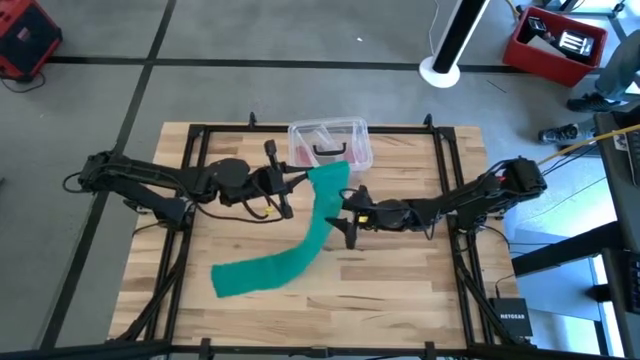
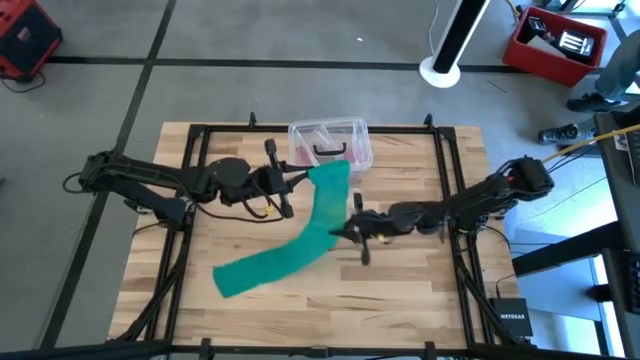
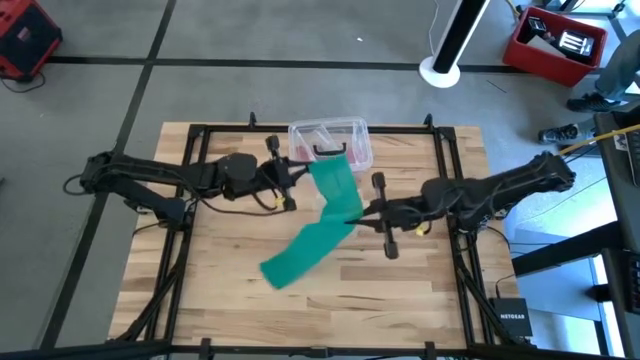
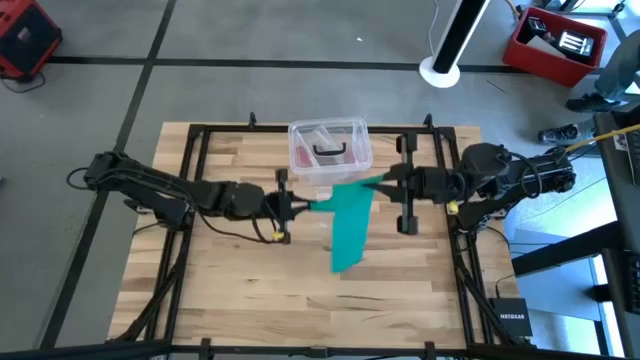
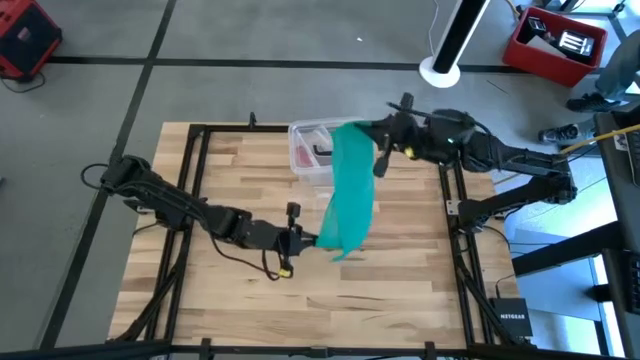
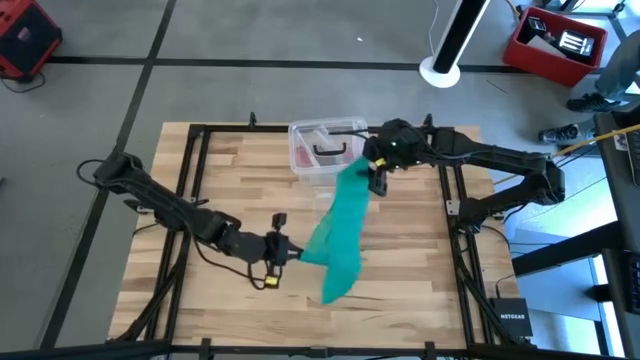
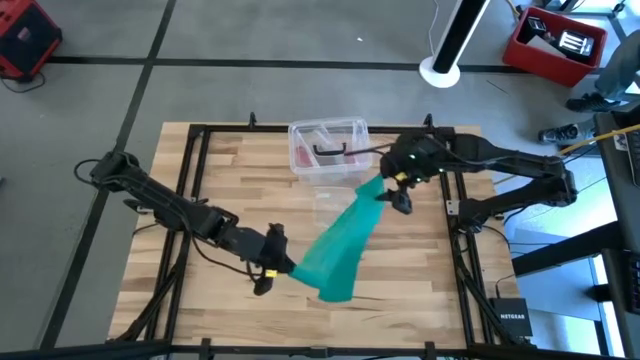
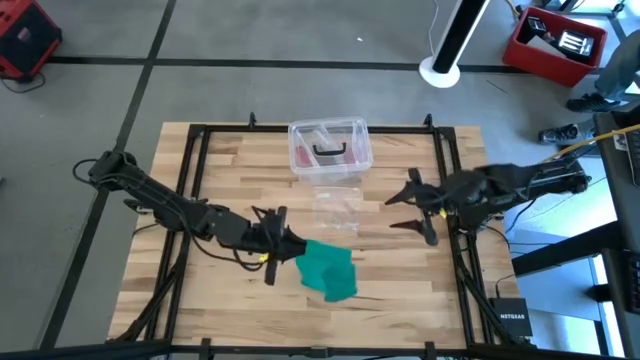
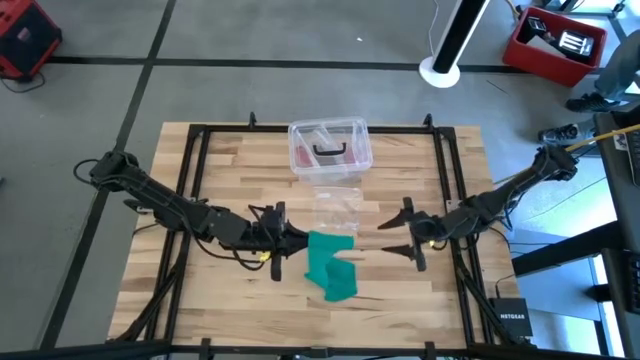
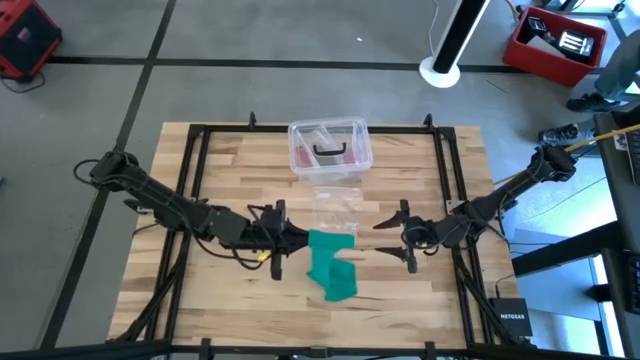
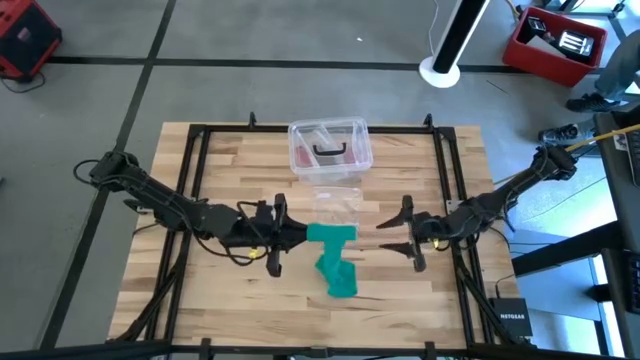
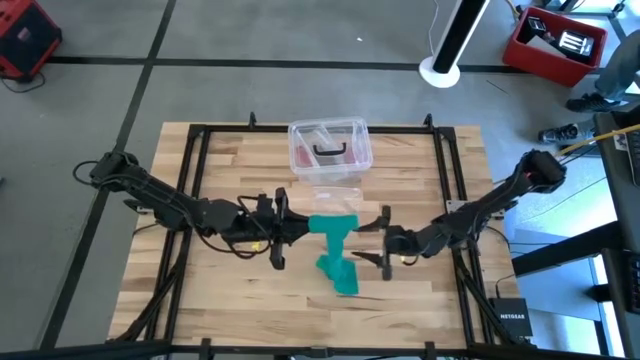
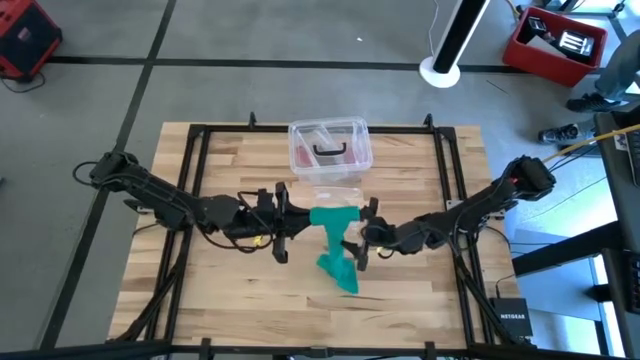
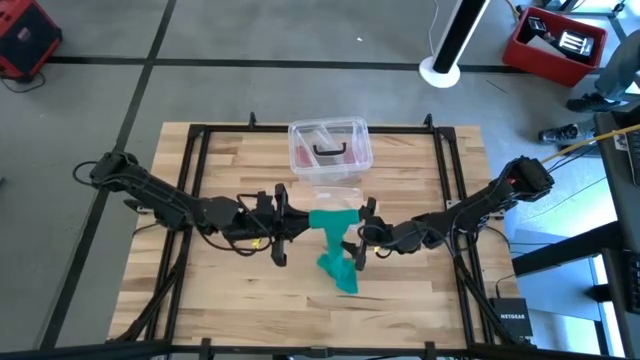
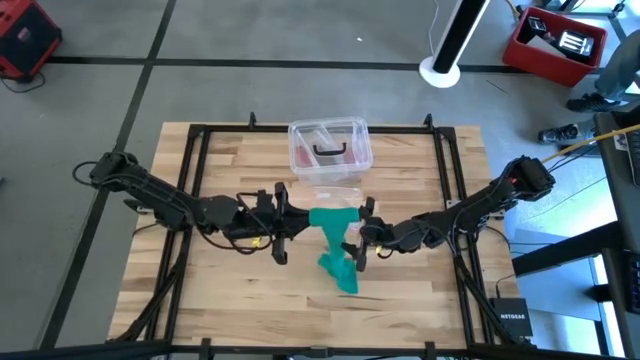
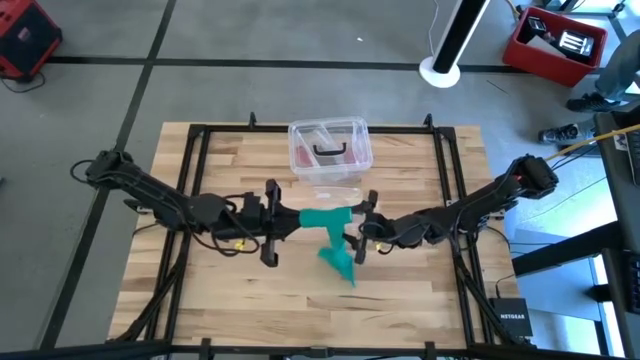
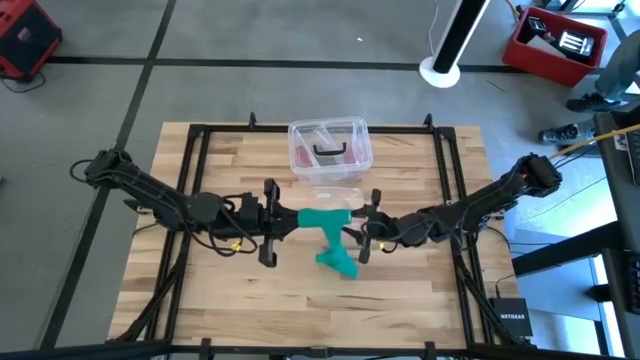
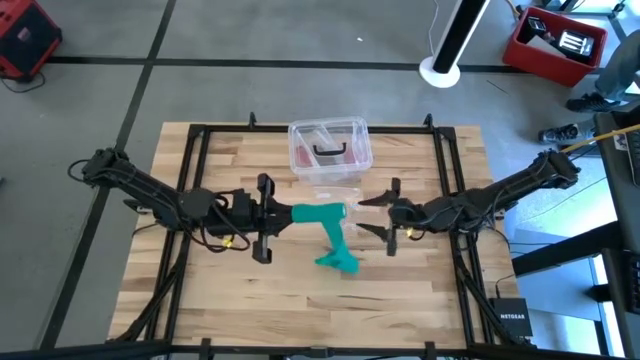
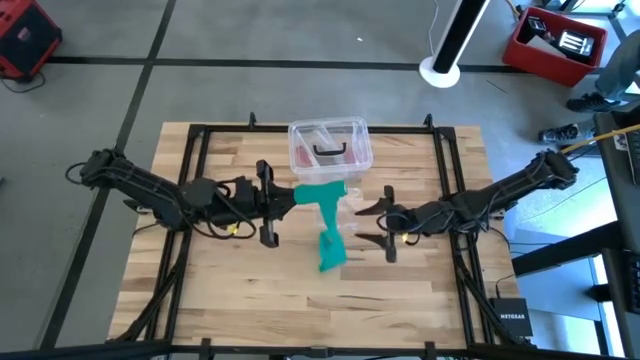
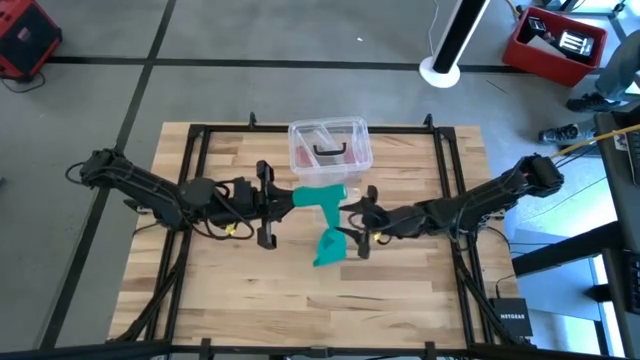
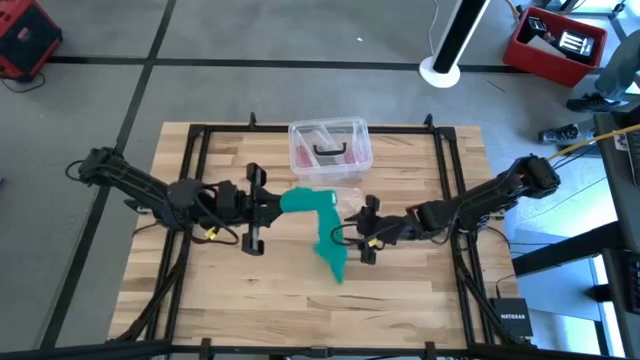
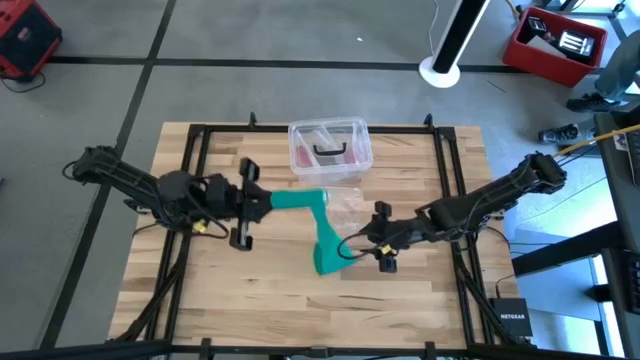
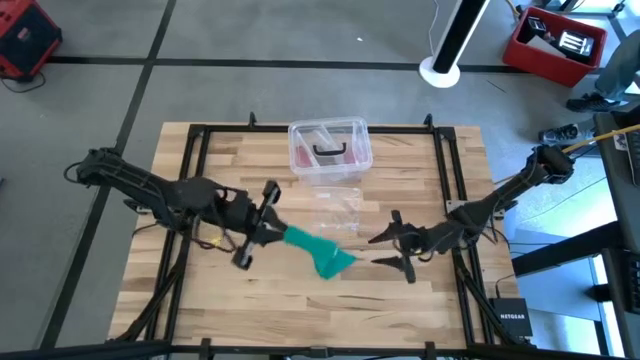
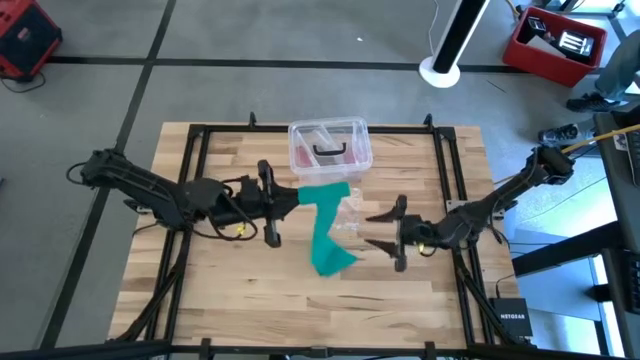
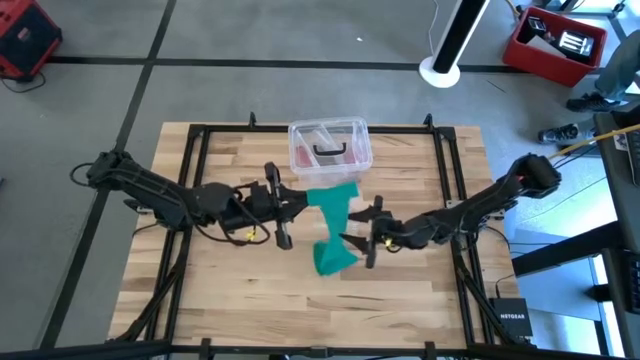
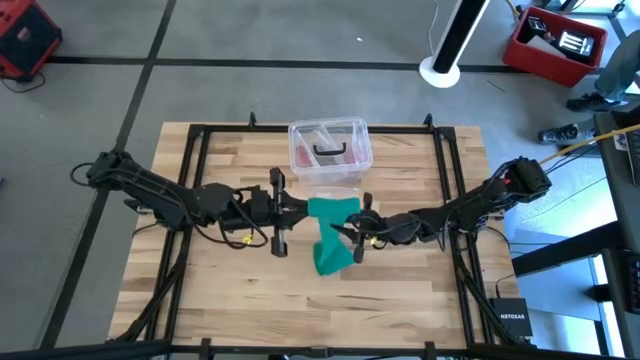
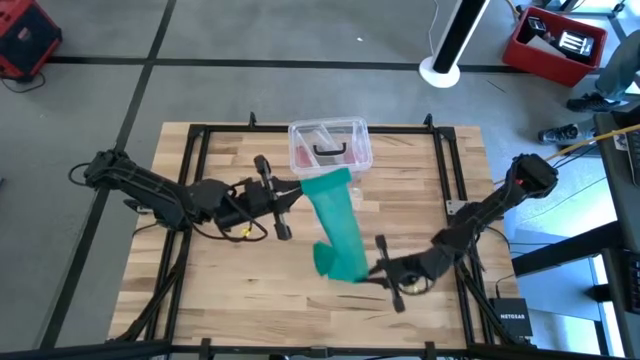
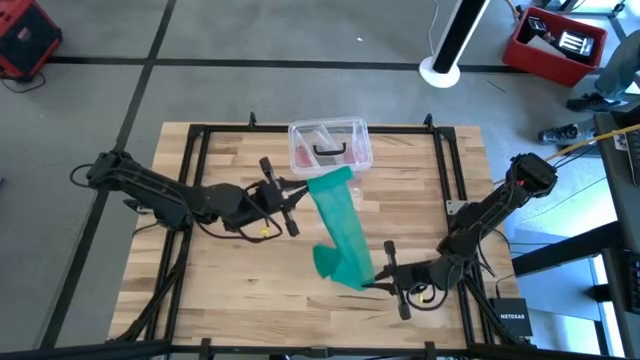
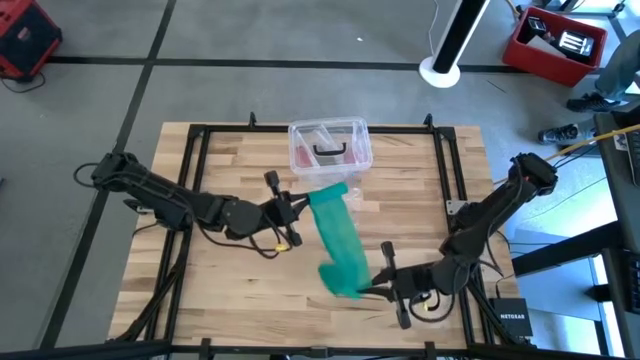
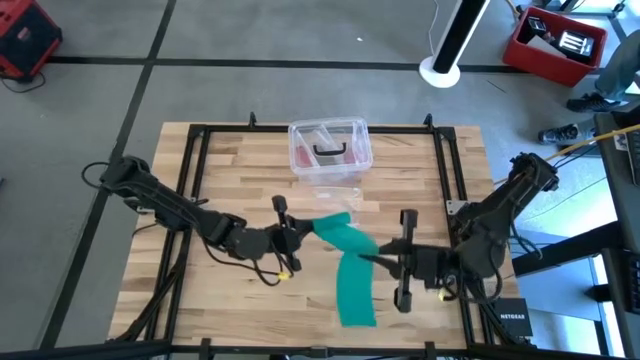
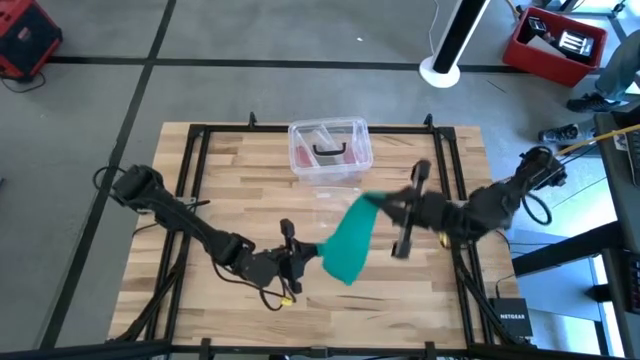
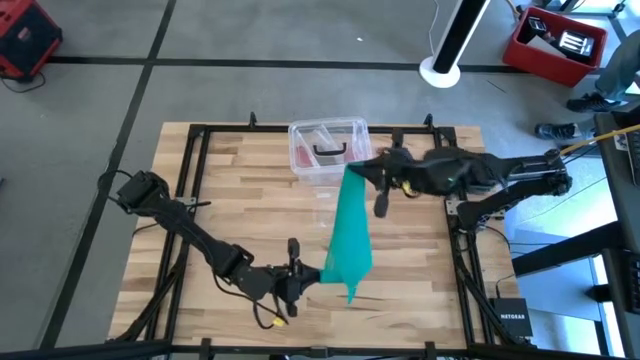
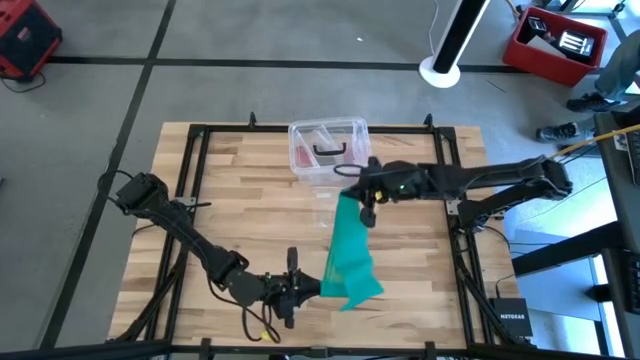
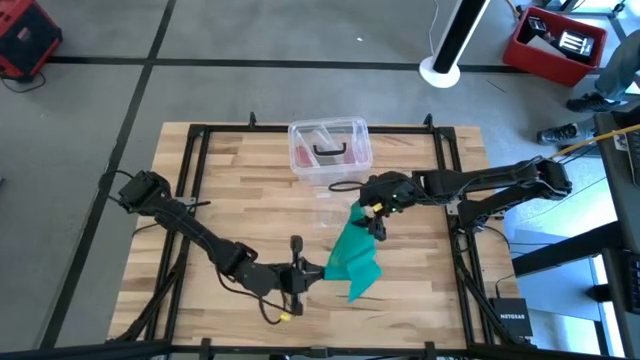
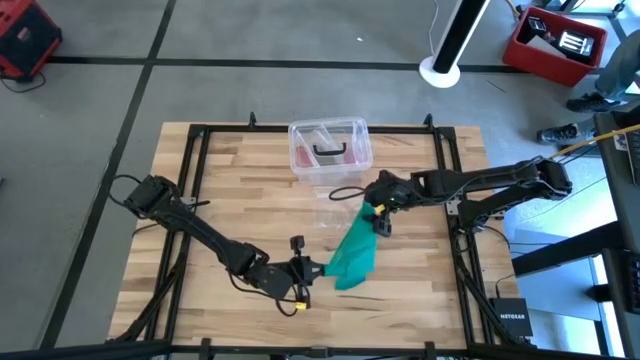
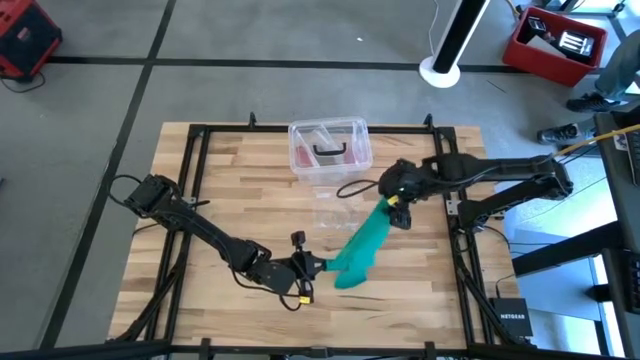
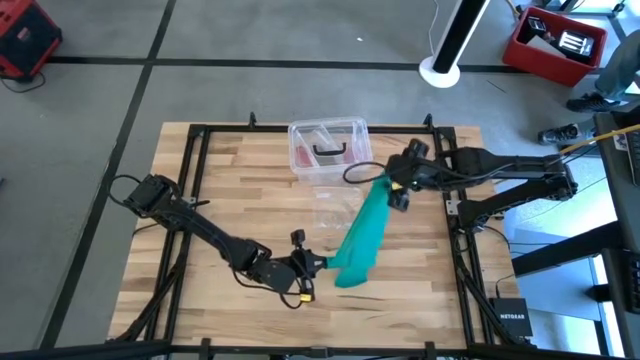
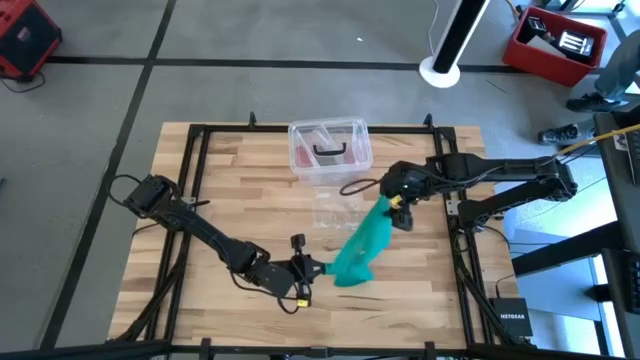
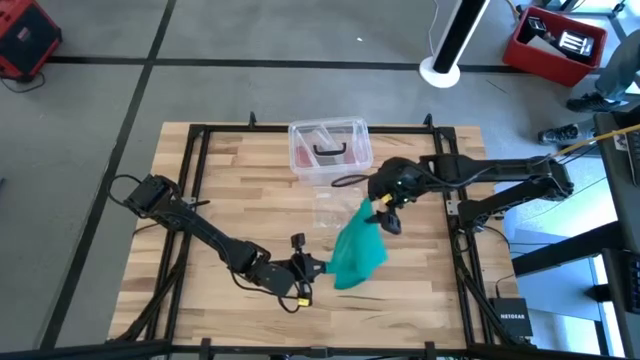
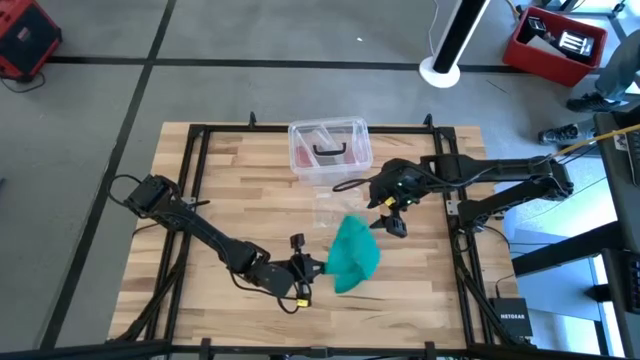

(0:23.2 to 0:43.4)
Task: Roll bandage
Roll the green bandage
